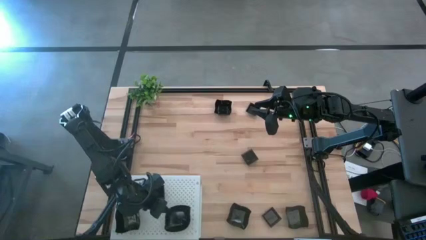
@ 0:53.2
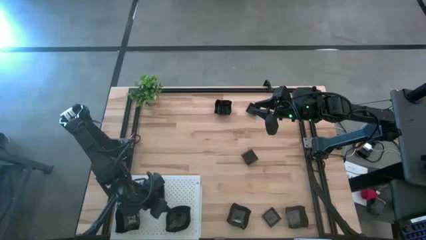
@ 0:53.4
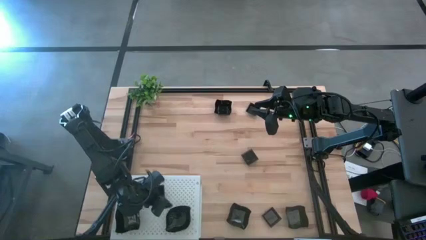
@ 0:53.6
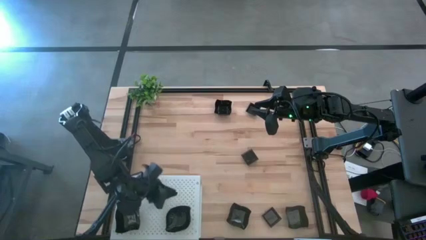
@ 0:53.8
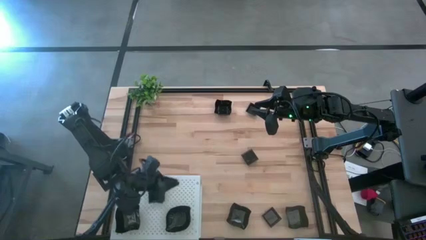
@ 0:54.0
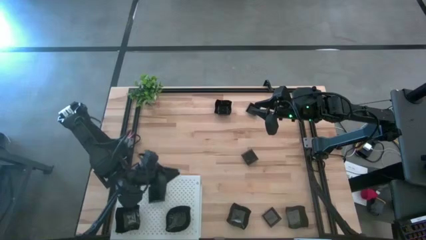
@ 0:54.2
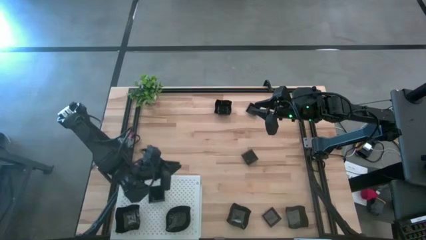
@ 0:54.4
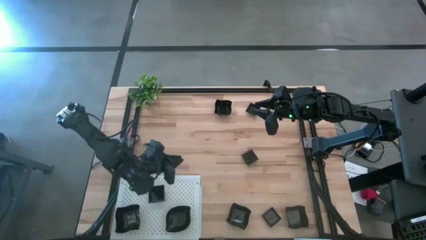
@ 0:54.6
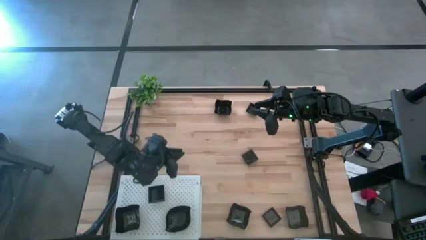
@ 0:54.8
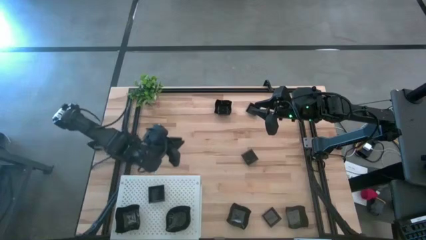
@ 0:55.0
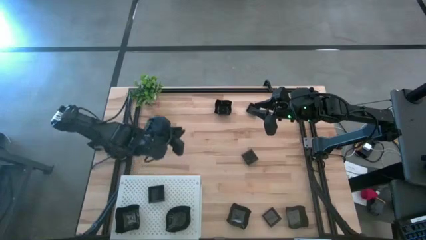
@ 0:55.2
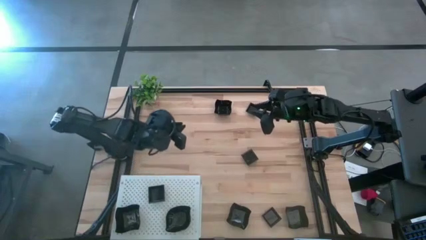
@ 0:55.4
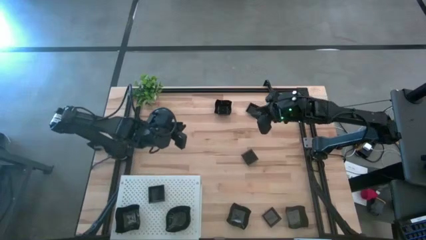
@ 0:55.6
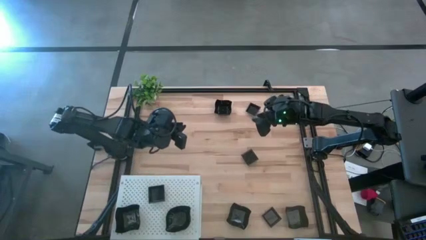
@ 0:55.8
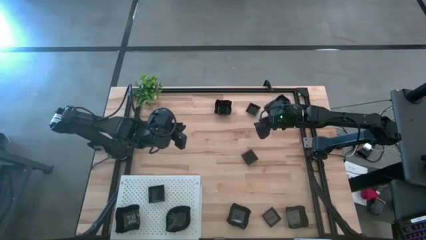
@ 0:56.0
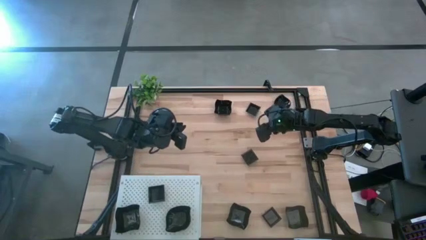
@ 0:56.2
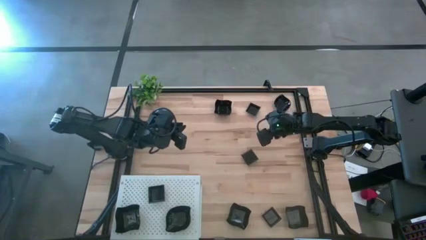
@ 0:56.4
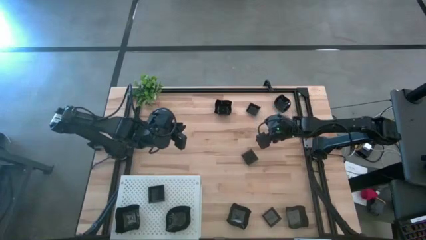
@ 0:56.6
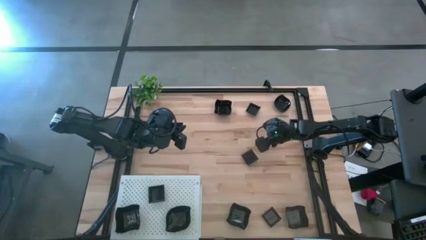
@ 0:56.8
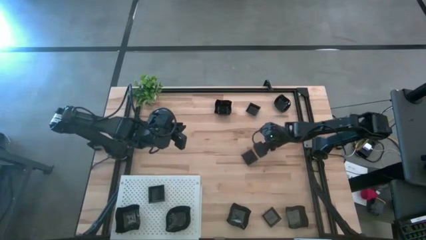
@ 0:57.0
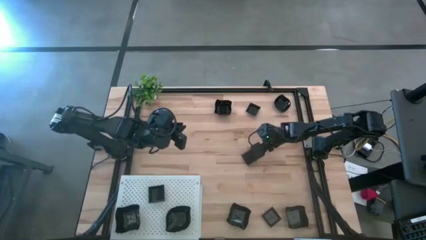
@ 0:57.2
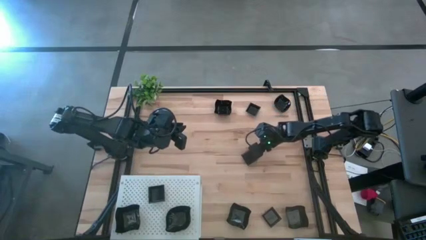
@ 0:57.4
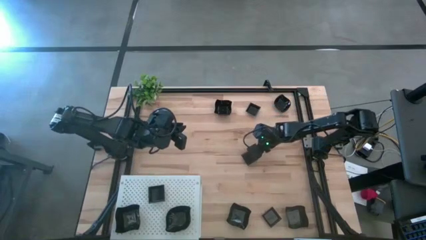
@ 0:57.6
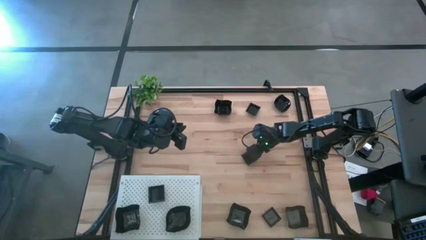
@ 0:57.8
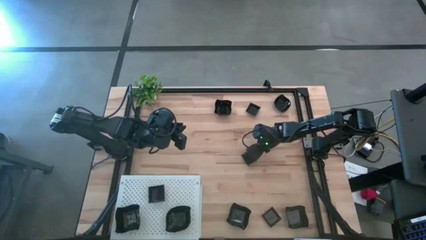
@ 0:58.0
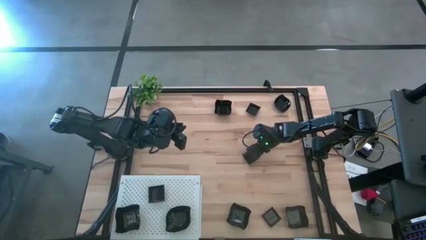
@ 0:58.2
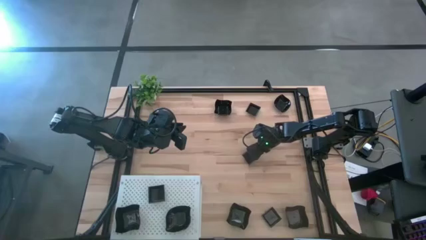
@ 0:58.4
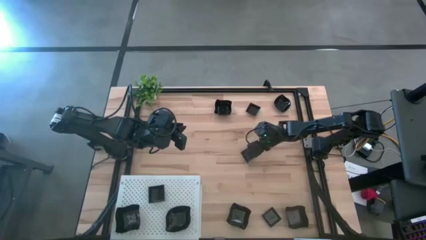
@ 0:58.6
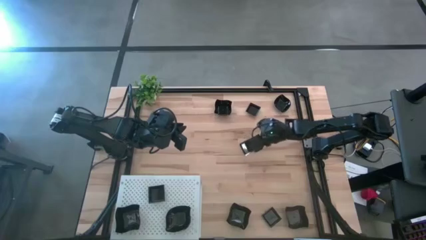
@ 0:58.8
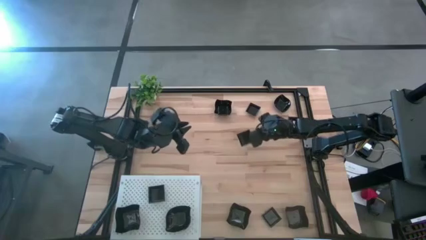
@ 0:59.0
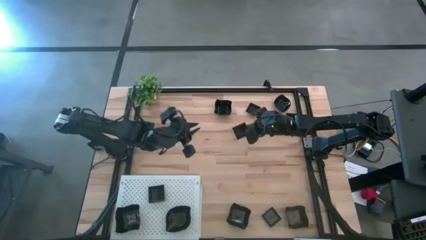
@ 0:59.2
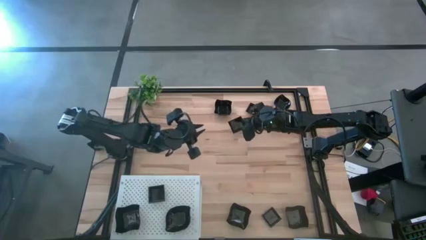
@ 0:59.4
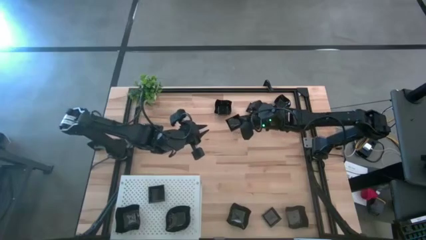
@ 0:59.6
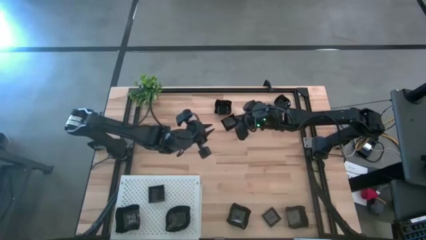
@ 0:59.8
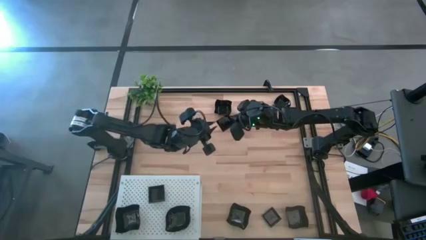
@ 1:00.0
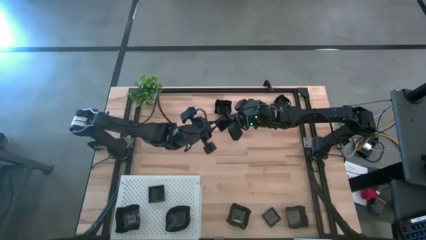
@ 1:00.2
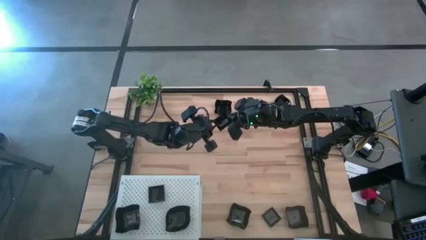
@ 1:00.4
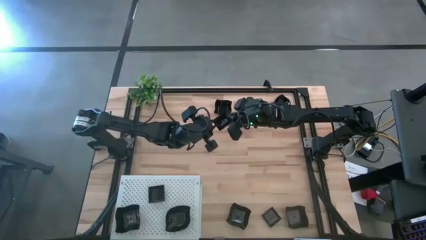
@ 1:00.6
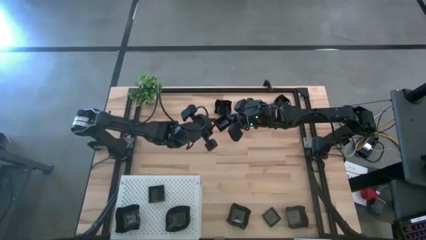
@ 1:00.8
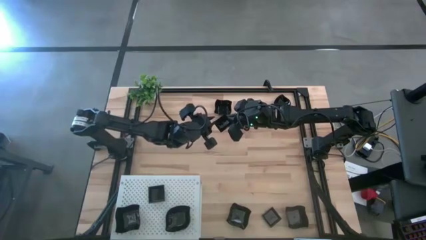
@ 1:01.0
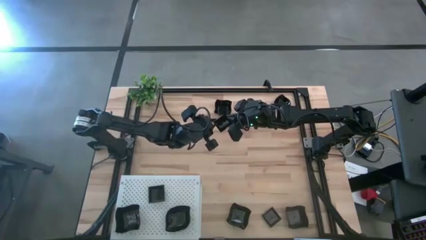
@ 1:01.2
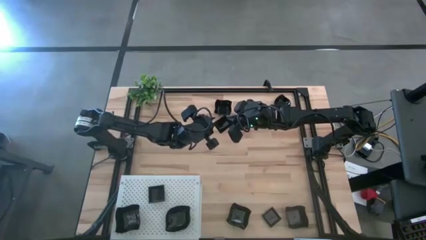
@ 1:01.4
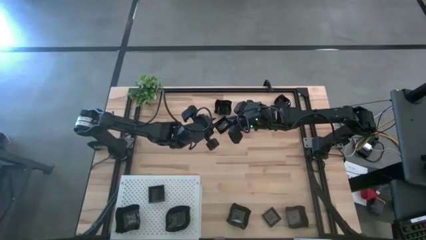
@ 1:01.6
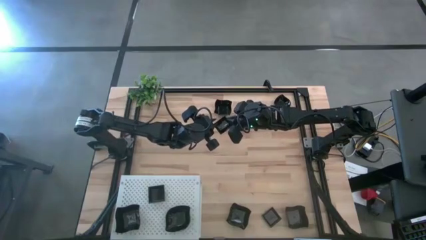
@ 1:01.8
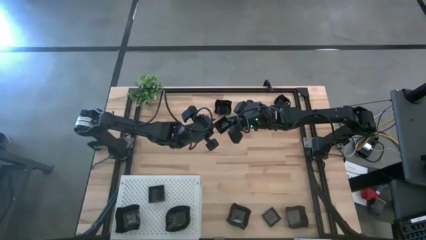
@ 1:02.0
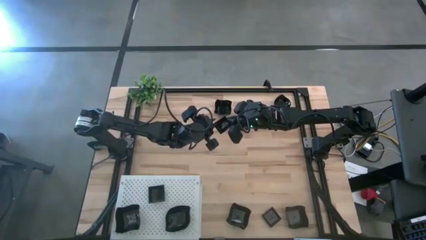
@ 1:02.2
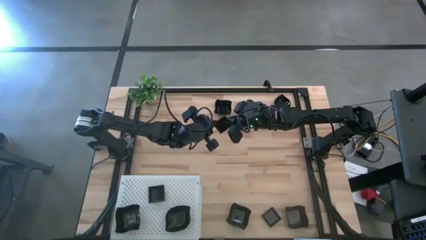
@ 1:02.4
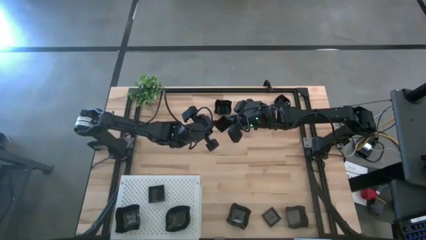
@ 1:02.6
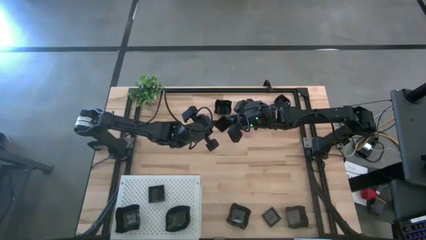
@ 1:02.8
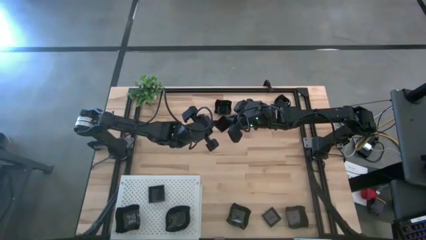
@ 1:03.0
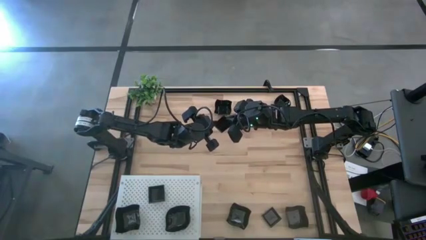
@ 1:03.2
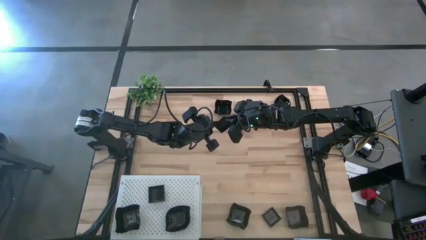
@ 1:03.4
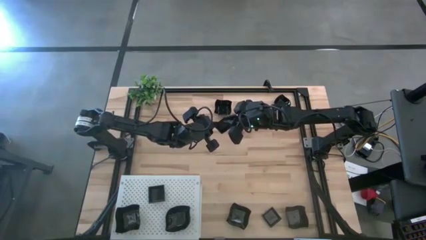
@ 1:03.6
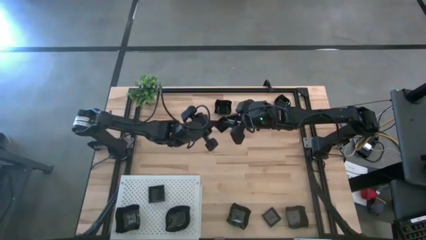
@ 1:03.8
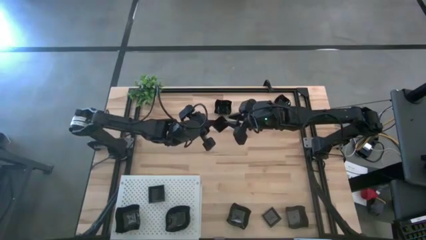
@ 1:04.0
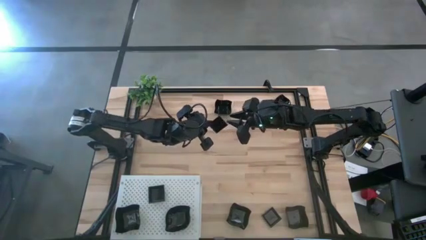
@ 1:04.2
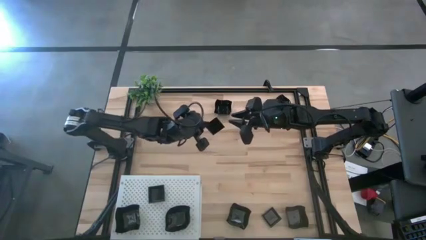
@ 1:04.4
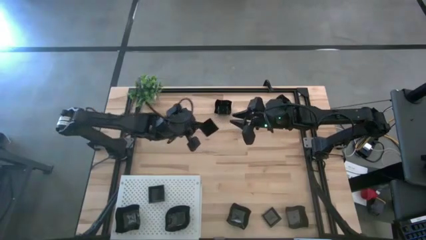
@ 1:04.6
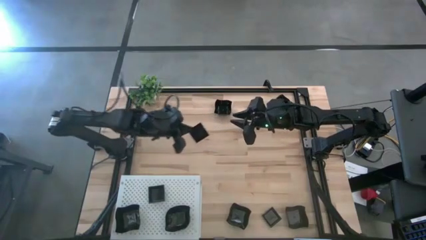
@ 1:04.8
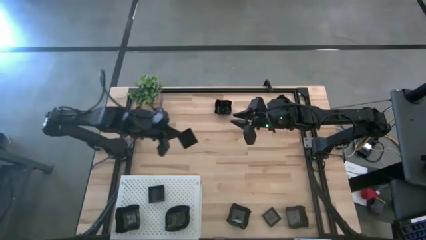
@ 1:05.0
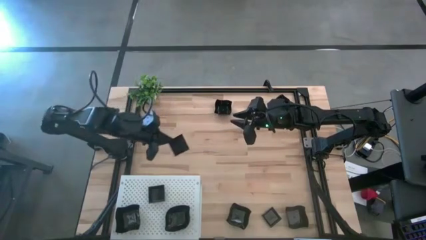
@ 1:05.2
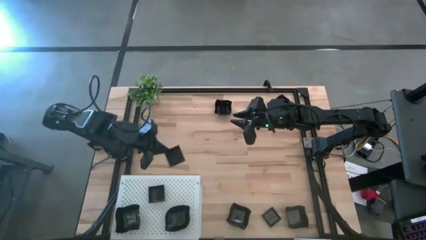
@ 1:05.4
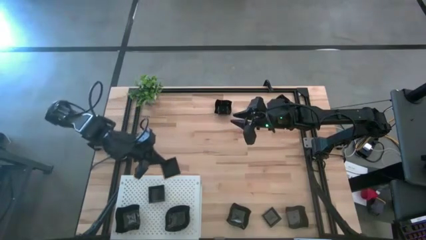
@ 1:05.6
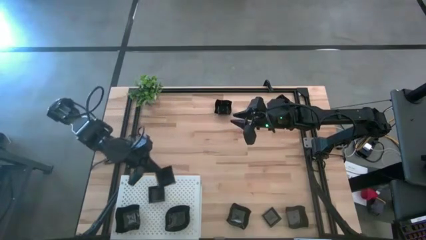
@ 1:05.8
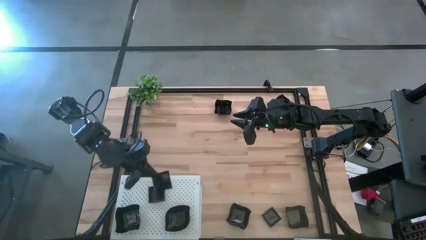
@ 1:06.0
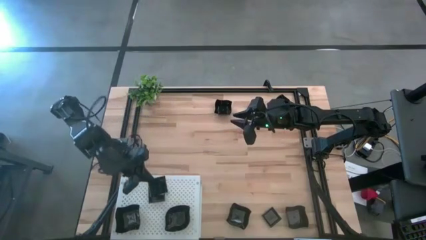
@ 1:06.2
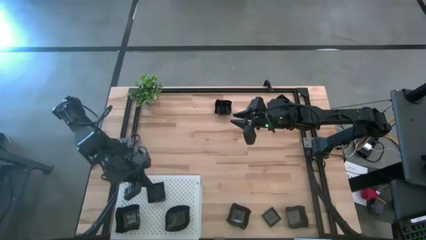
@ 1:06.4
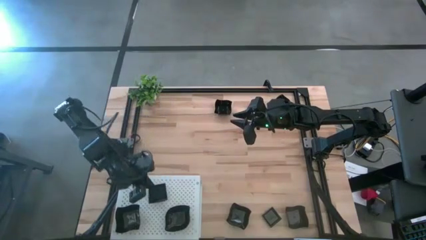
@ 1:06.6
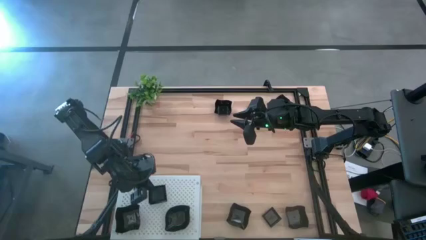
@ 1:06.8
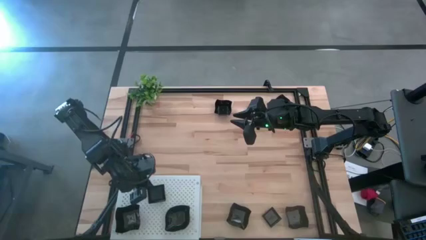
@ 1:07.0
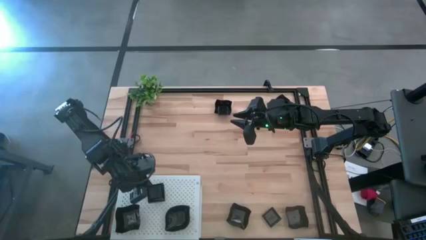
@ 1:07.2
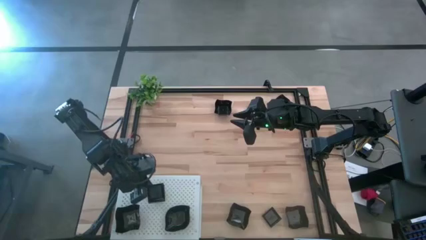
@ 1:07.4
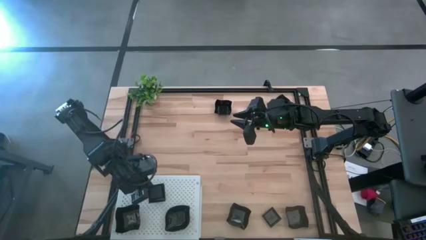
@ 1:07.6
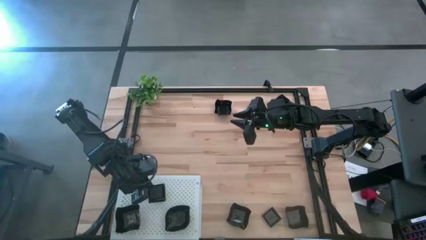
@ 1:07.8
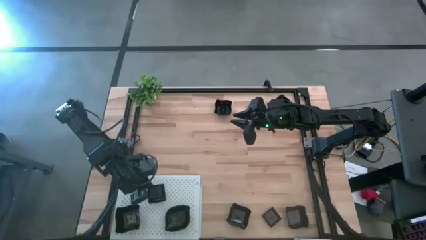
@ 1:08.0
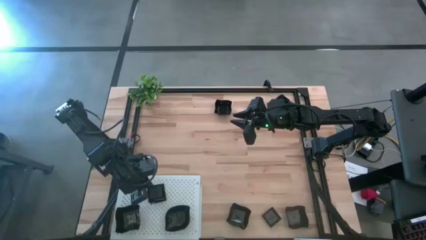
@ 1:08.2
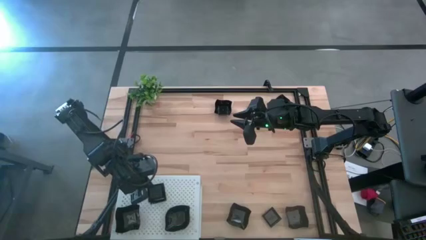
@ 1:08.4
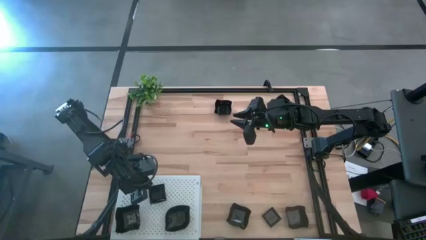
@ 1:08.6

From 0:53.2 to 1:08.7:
Task: Pick & Place Mini shaped plates
Stack the square plate on top of the square plate on the shelf
